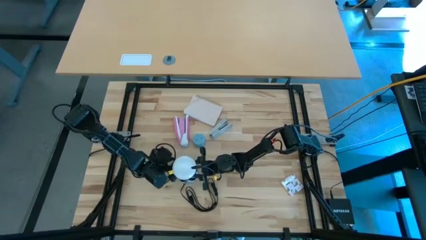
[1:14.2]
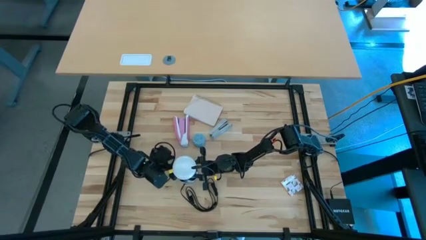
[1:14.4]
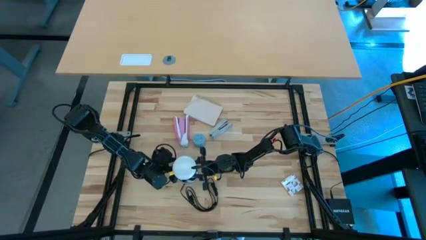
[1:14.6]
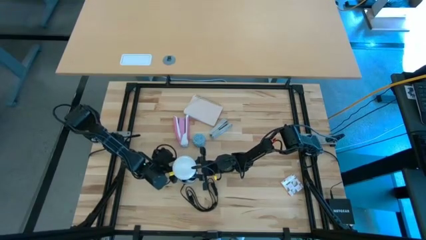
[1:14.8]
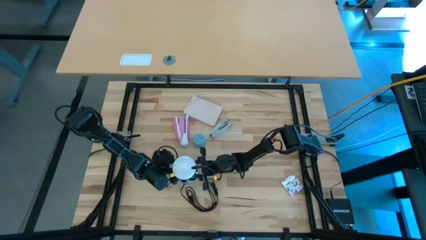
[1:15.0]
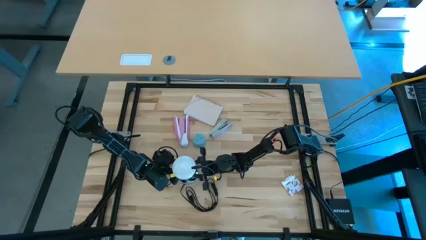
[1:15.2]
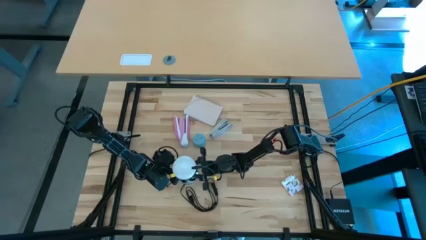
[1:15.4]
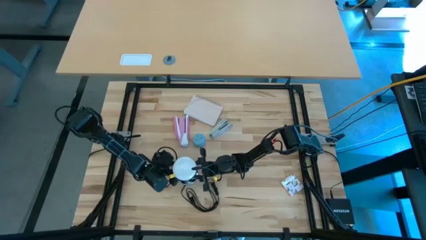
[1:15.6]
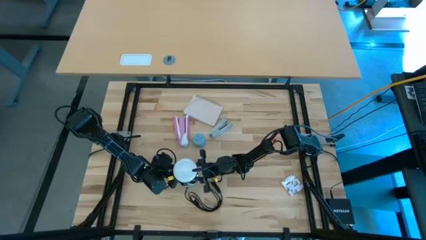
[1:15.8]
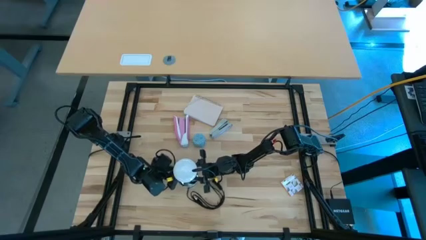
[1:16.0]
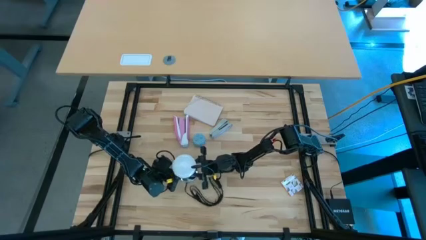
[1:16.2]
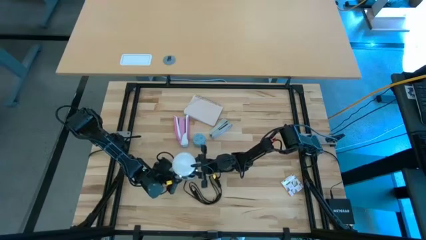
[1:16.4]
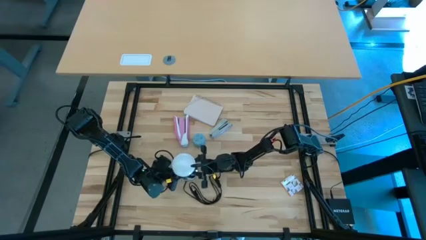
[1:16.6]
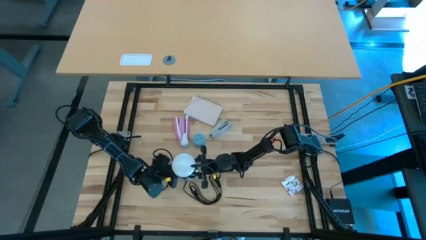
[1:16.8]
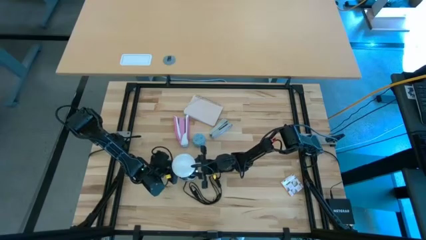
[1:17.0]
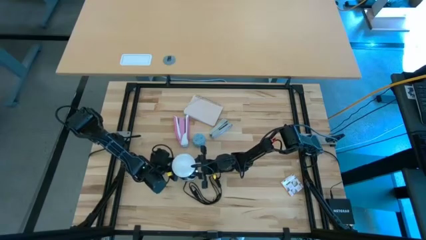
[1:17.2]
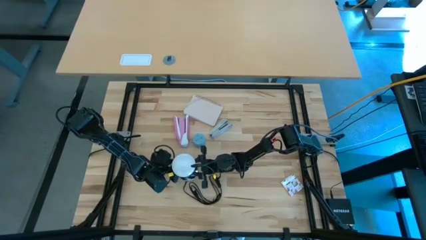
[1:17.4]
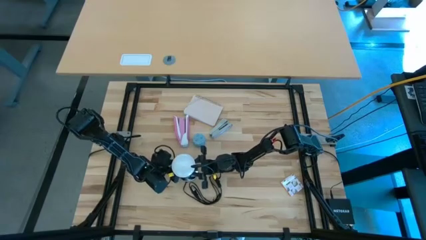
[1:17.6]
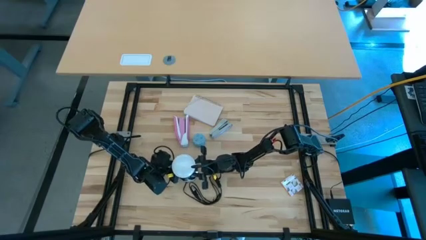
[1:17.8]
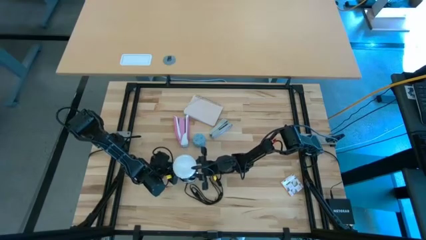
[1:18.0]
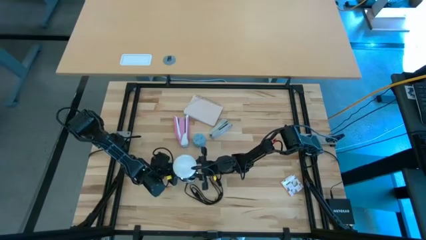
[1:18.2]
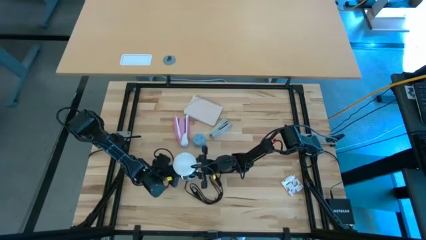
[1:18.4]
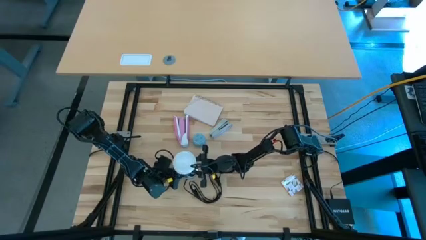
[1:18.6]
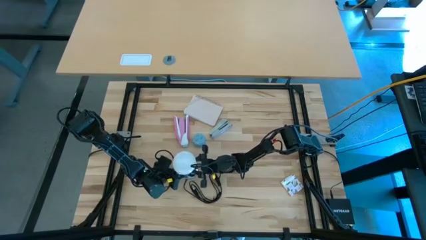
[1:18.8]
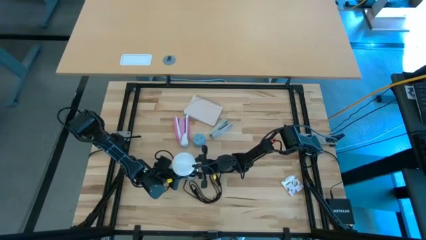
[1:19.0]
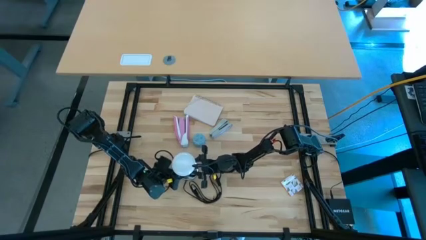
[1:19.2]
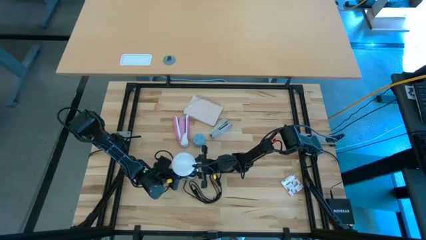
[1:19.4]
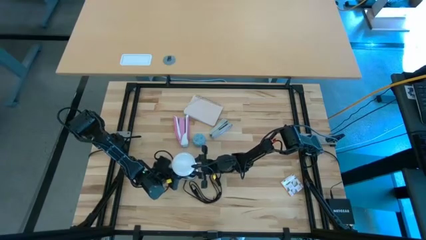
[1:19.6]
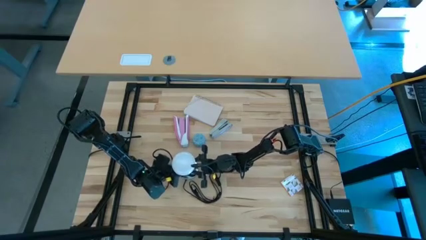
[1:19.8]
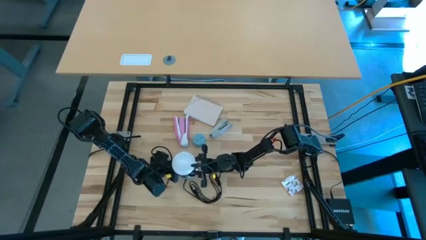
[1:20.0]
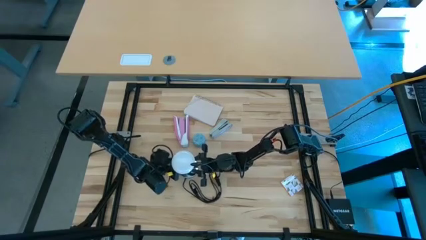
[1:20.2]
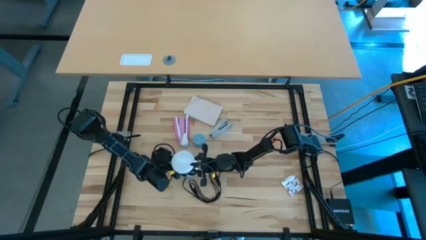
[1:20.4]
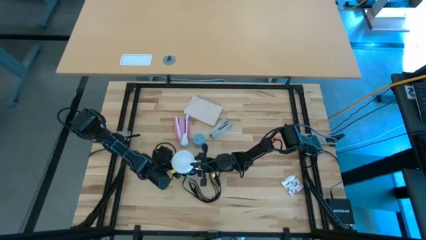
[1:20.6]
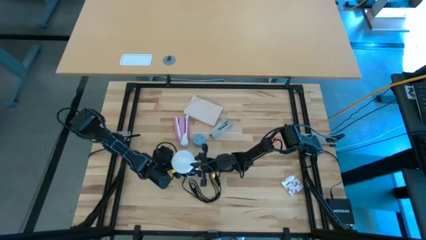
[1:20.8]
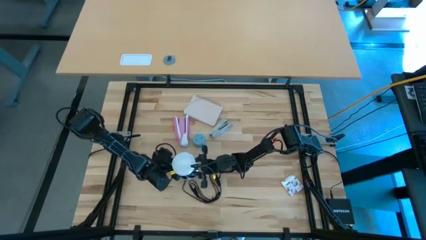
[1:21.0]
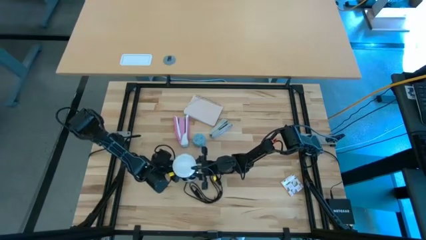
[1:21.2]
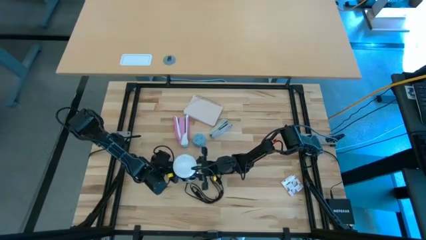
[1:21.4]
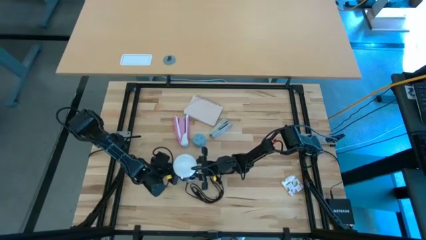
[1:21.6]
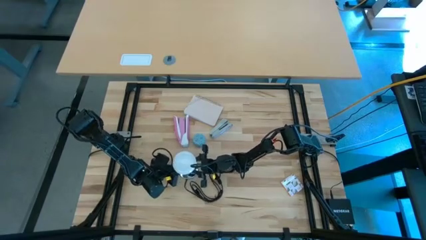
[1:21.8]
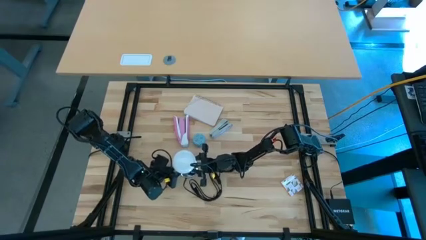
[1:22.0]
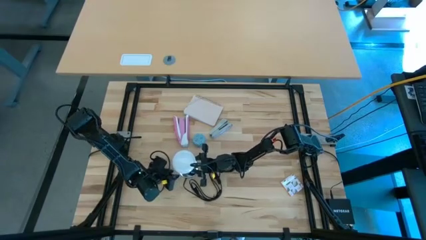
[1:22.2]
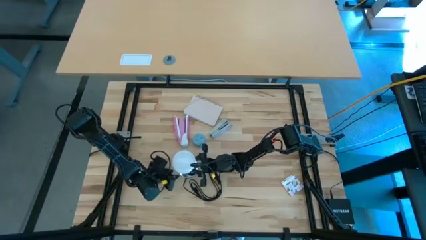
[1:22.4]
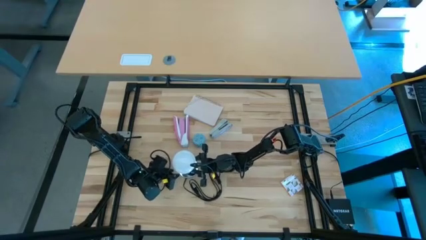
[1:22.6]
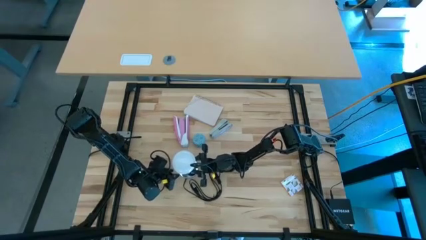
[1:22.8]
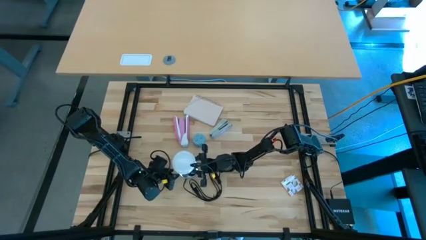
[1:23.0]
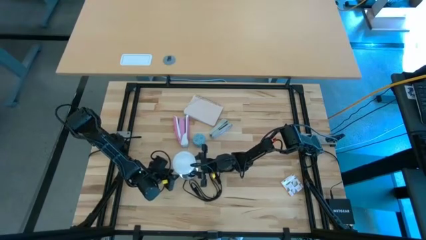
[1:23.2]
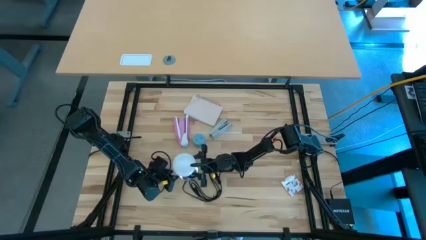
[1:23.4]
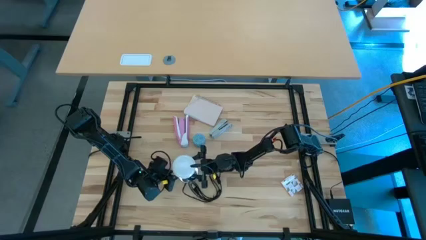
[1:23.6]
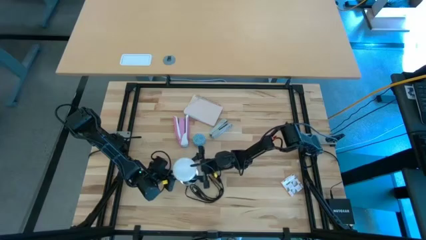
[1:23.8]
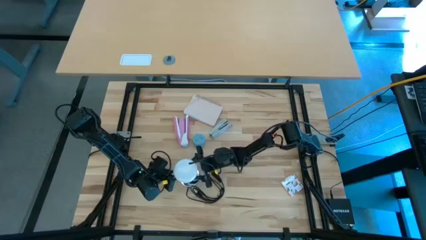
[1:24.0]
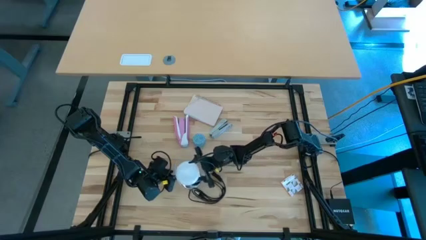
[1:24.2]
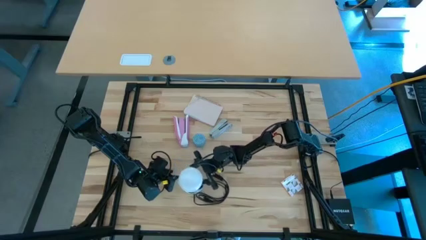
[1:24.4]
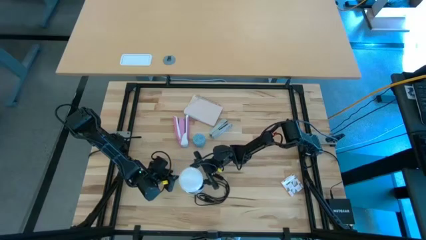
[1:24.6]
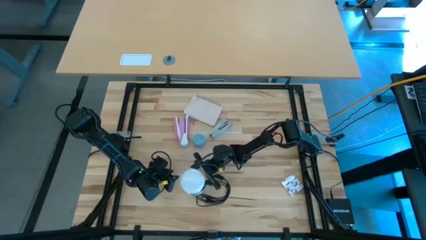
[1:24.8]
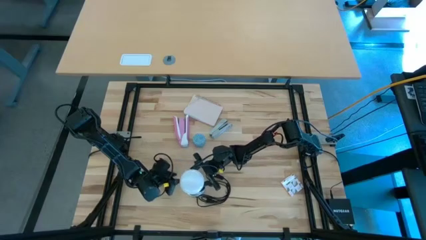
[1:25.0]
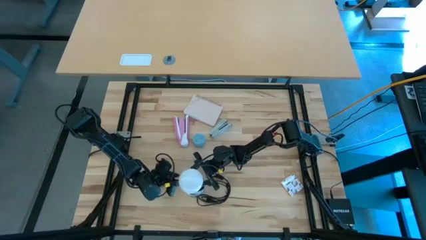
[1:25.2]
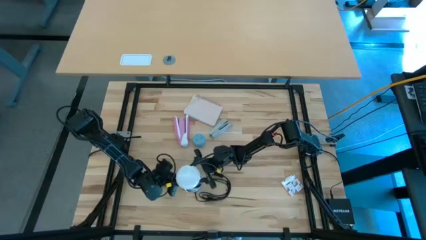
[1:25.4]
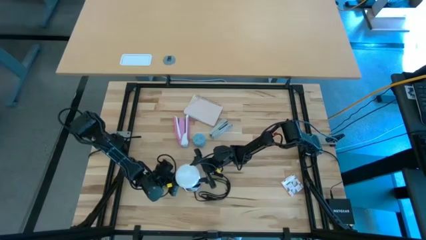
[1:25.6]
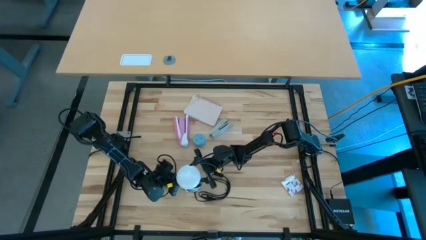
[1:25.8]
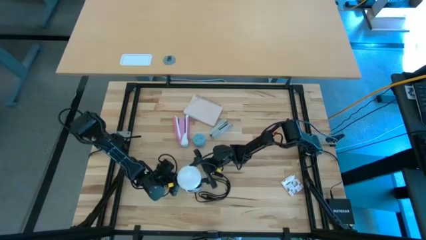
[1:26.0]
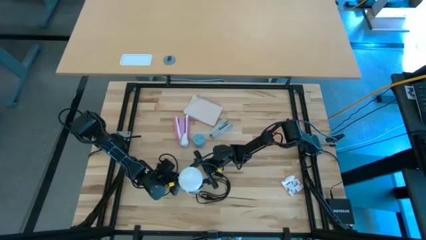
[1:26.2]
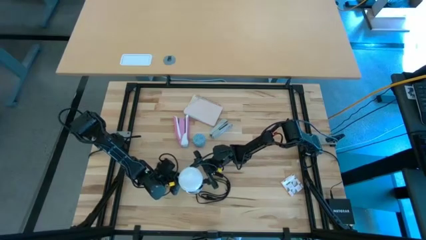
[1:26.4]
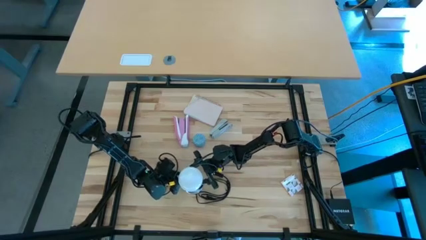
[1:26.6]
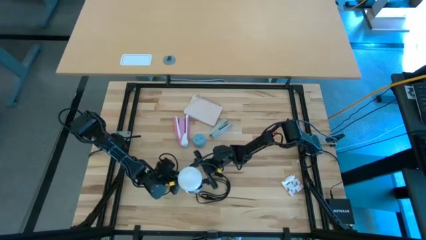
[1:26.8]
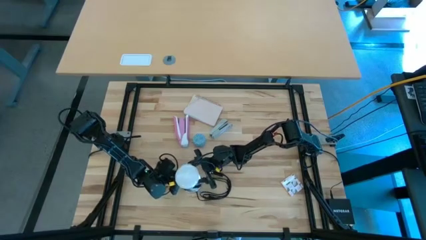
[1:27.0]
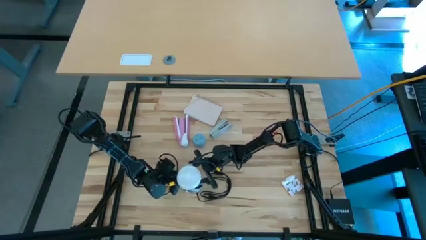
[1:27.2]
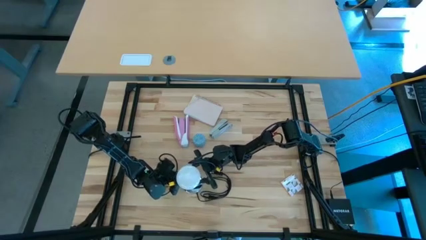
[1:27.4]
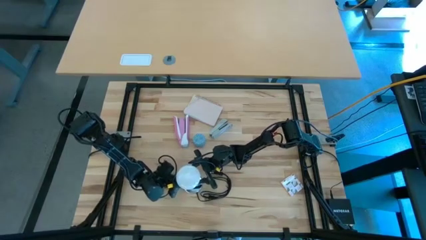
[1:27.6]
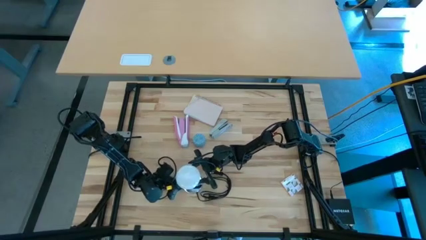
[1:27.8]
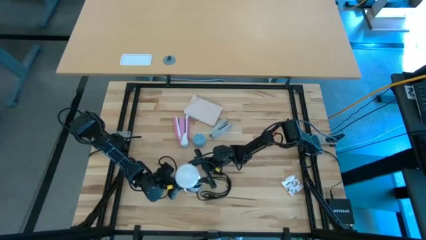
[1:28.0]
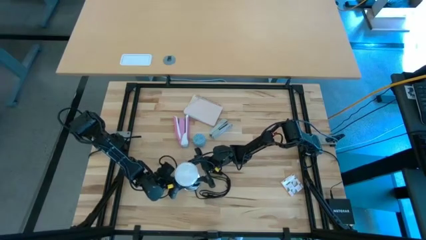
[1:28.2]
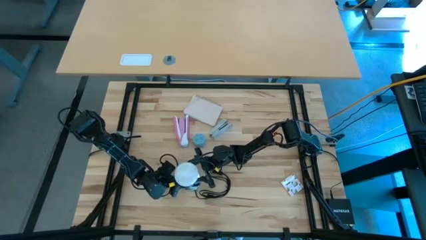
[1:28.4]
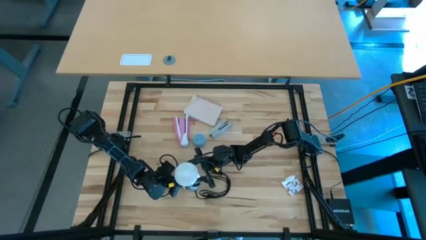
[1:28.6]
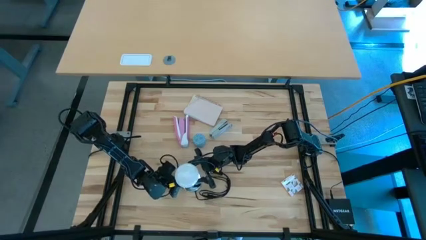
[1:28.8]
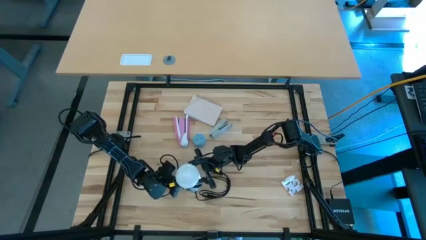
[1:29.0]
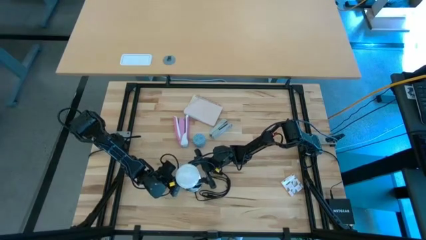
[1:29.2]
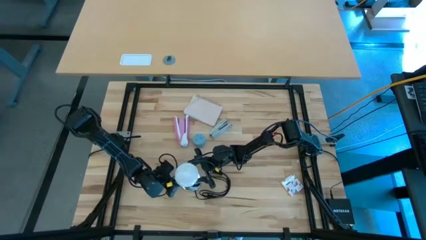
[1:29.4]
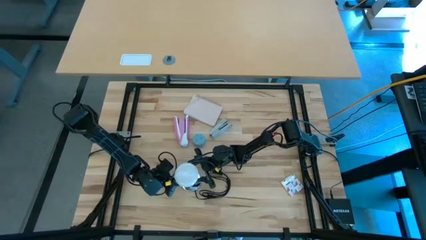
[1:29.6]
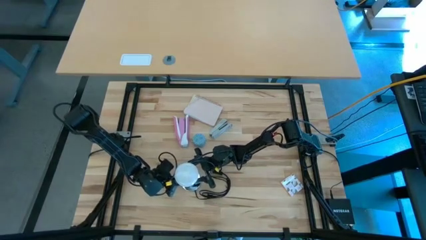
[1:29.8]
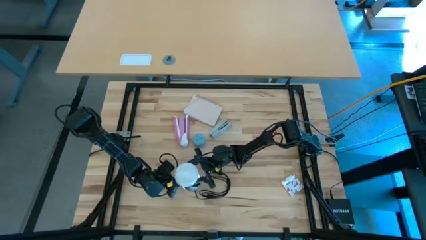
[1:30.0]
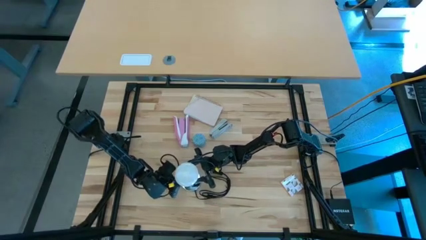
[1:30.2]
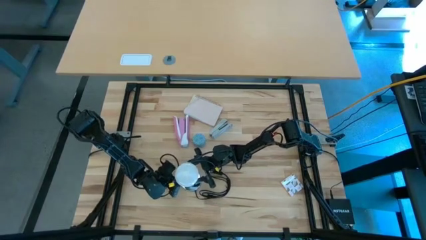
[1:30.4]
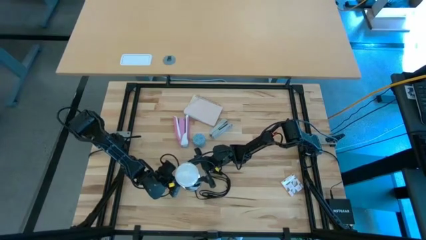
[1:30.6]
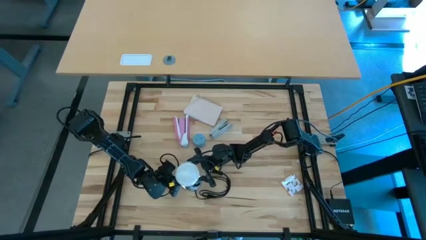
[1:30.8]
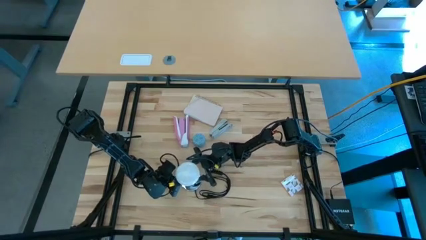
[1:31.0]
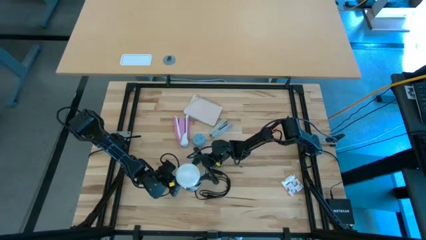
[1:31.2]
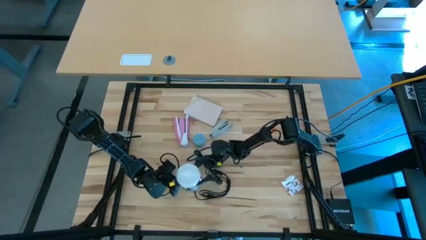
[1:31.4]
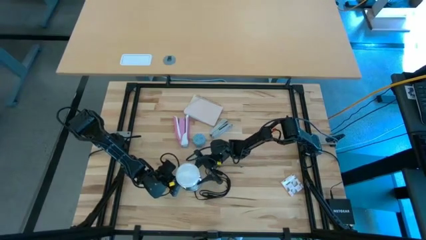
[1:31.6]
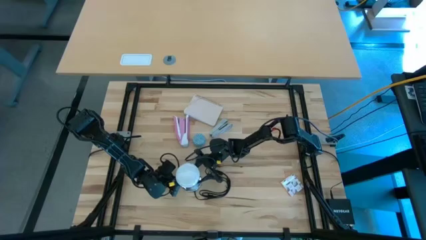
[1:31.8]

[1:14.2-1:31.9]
Task: Screw lightbulb
Insert the lightbulb into the lamp
